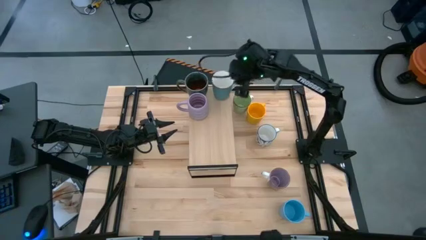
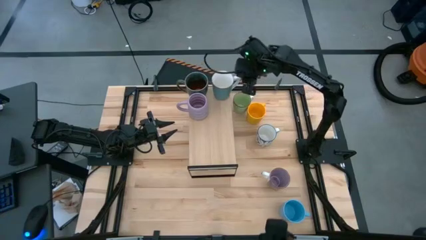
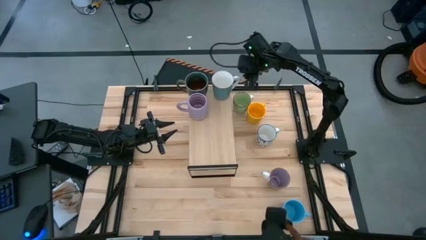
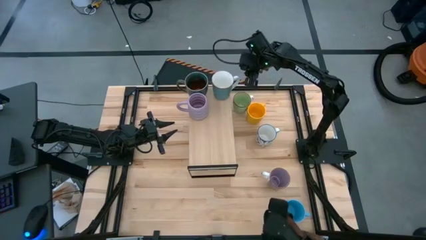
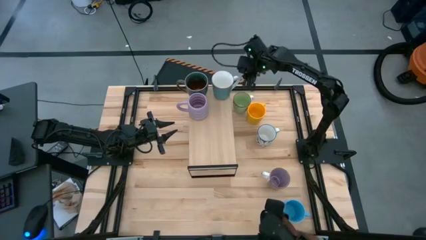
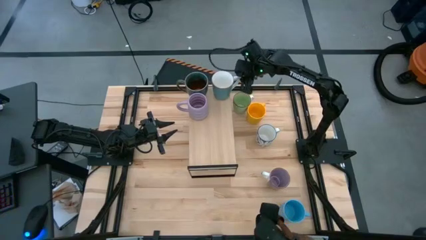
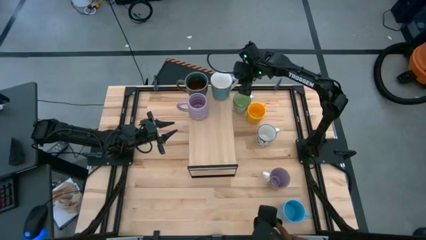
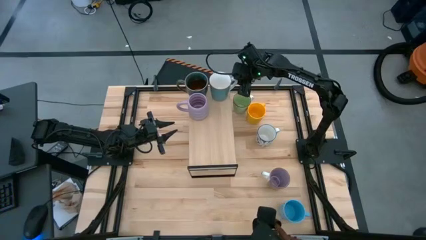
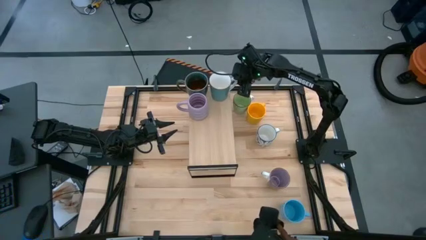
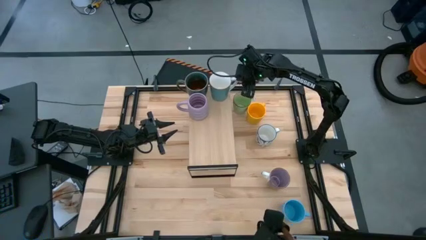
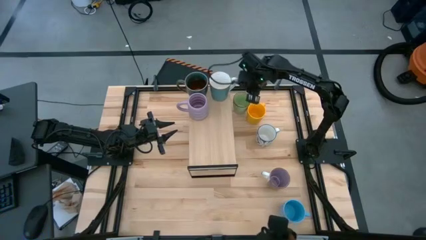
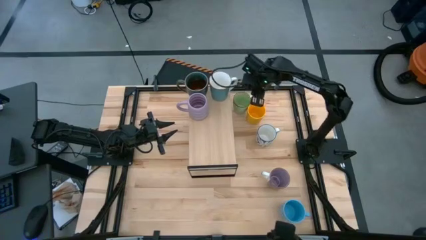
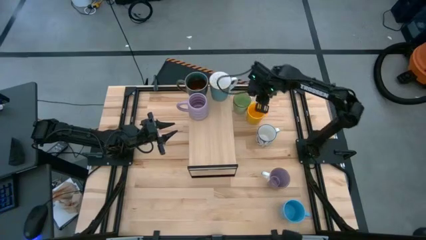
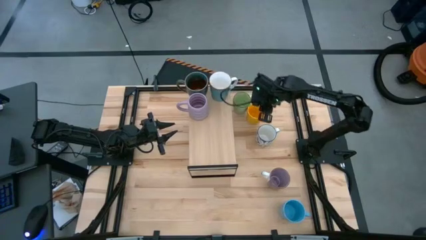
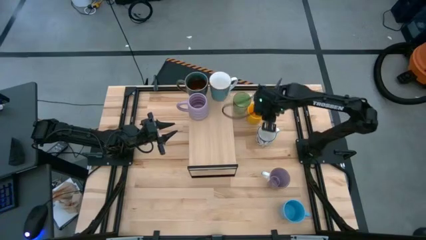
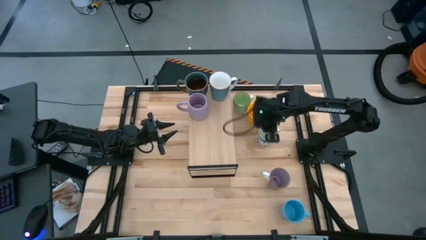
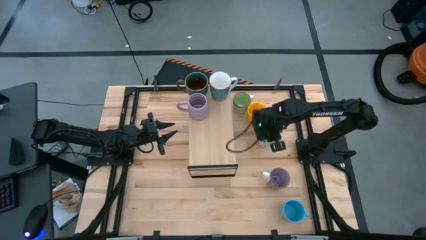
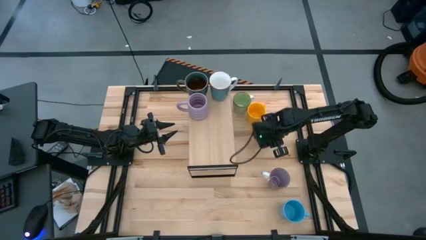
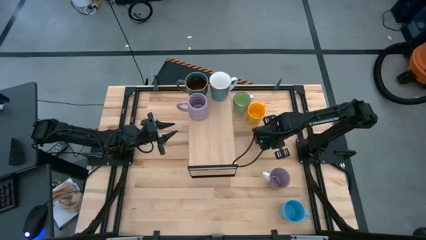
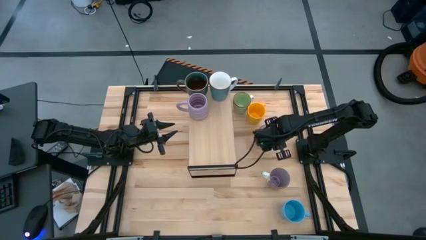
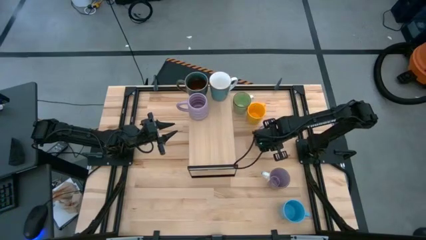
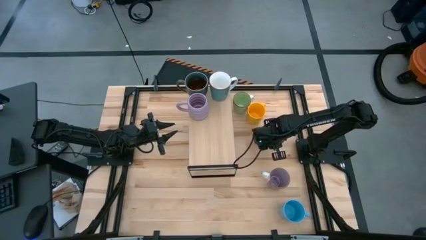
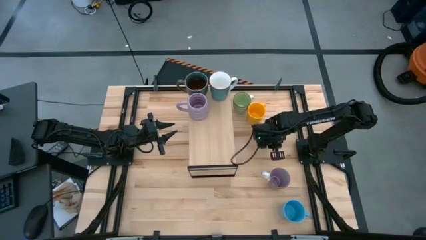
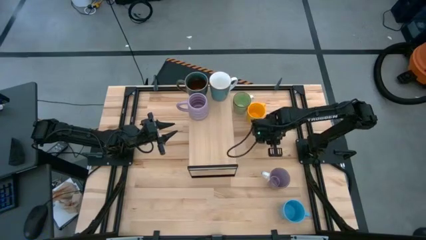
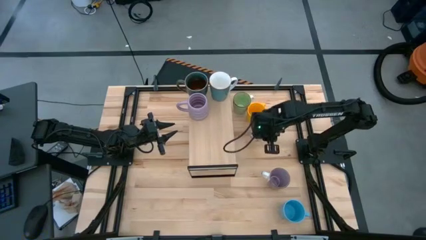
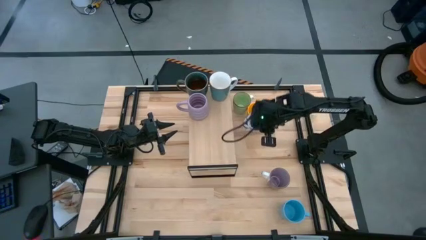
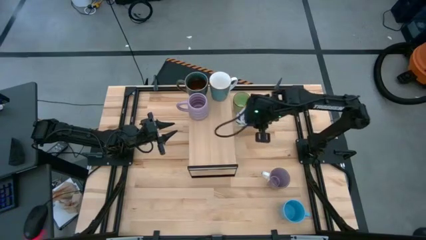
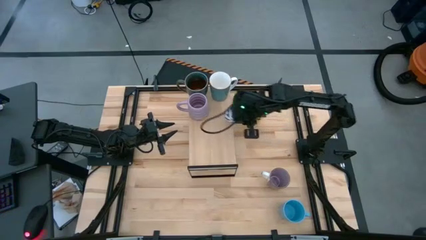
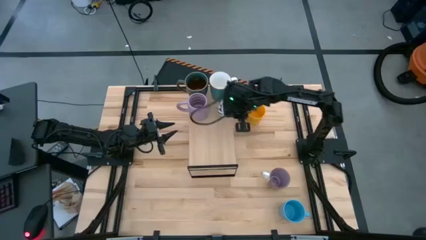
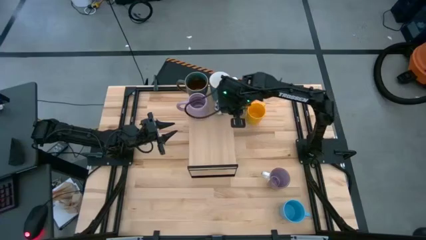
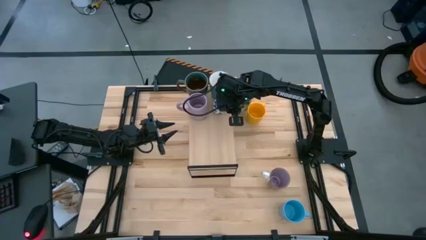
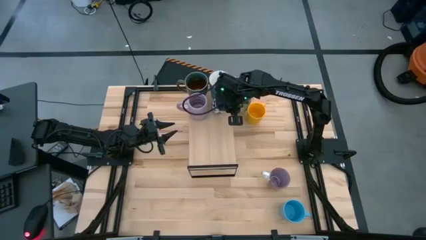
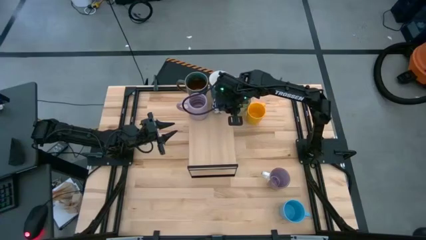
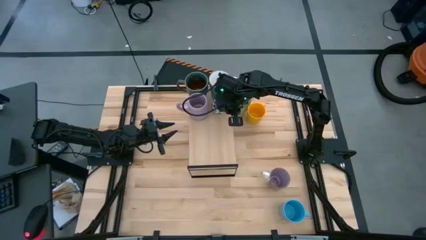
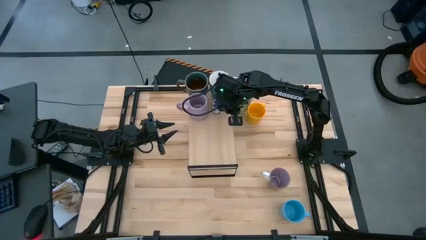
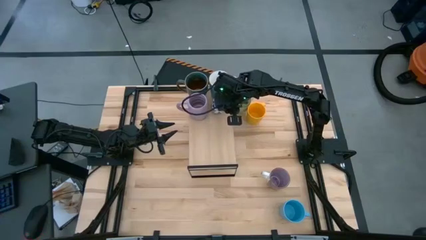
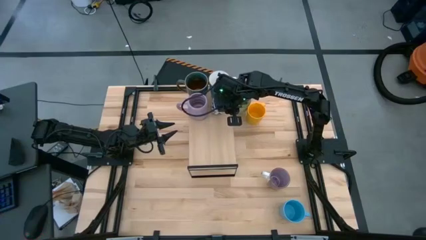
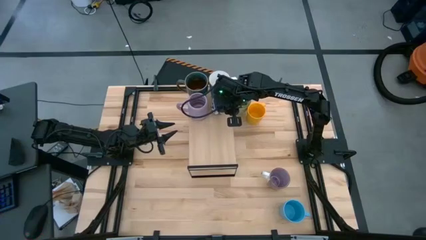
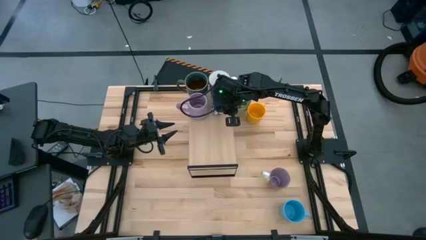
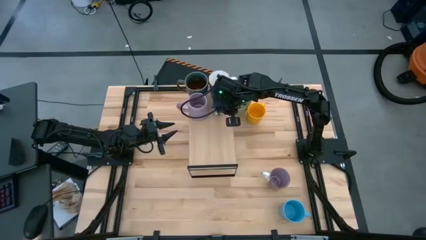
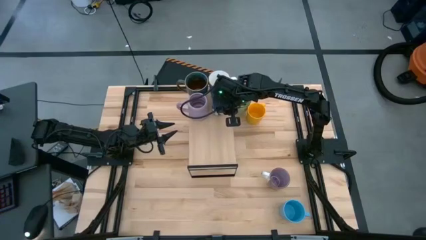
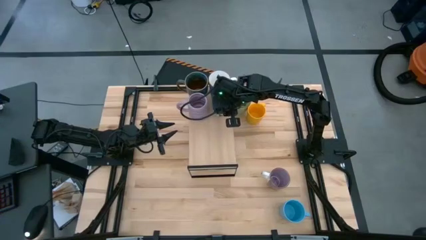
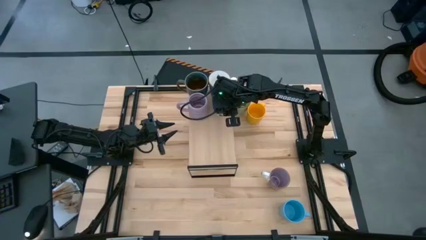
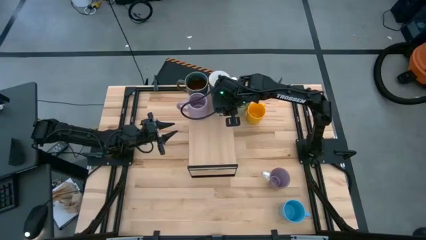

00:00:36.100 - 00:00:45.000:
Task: Place coffee mugs
Put the white mug on the shelf
